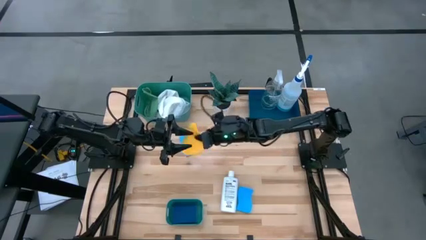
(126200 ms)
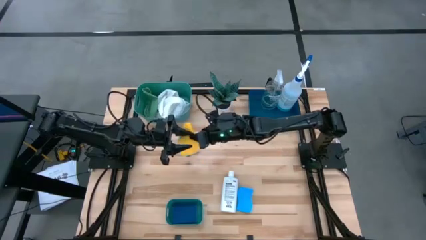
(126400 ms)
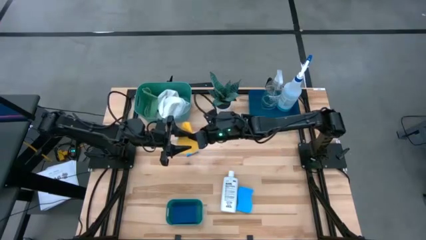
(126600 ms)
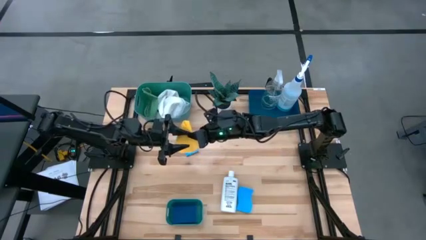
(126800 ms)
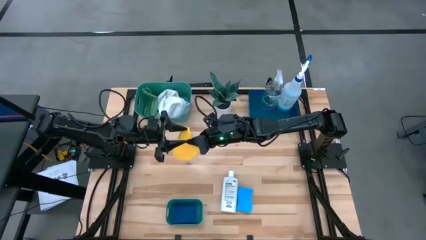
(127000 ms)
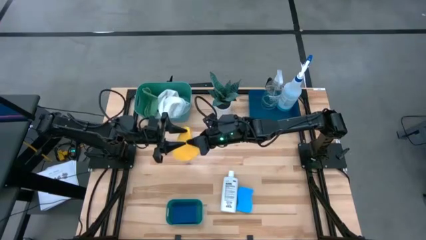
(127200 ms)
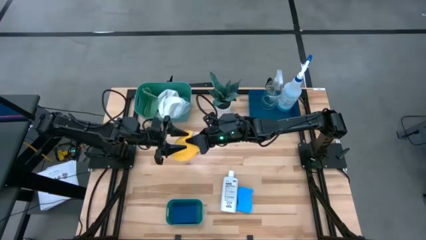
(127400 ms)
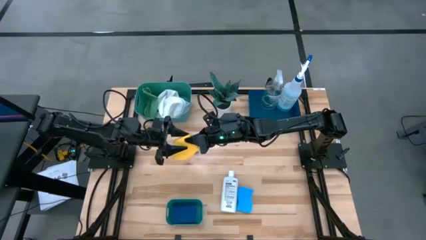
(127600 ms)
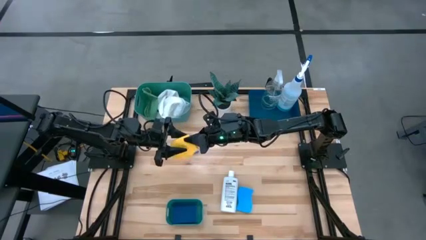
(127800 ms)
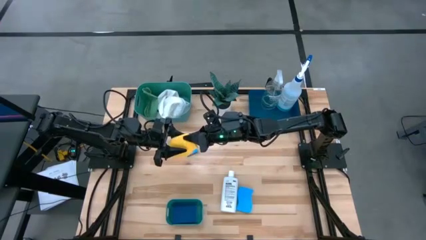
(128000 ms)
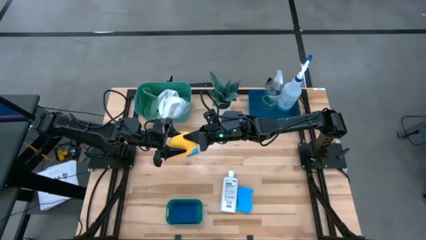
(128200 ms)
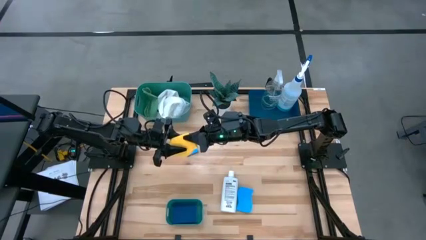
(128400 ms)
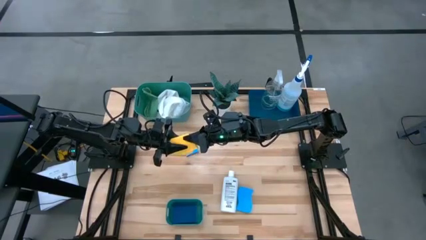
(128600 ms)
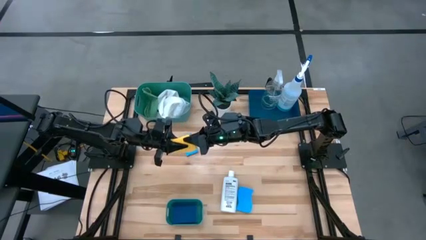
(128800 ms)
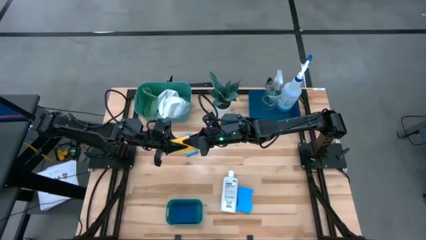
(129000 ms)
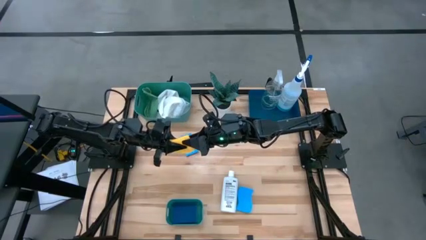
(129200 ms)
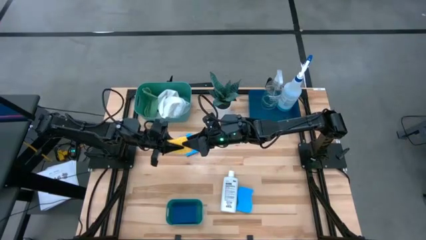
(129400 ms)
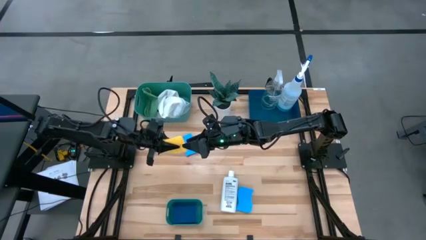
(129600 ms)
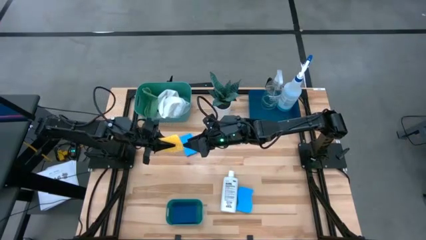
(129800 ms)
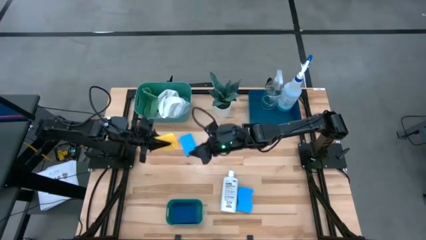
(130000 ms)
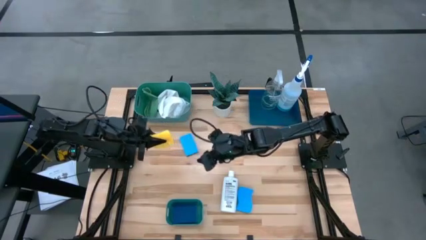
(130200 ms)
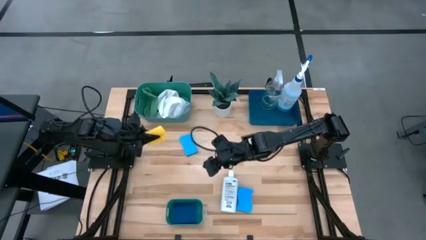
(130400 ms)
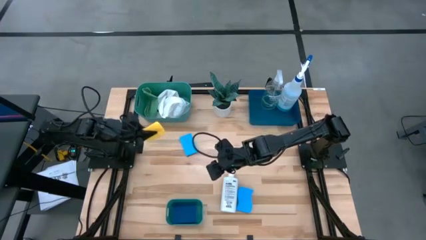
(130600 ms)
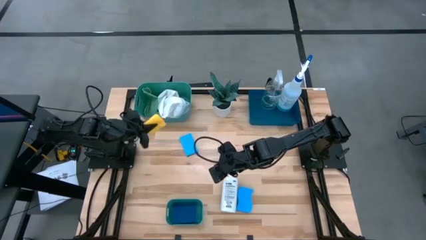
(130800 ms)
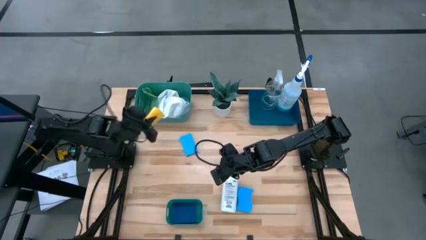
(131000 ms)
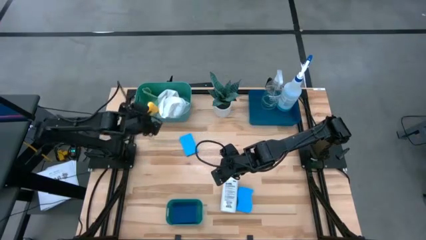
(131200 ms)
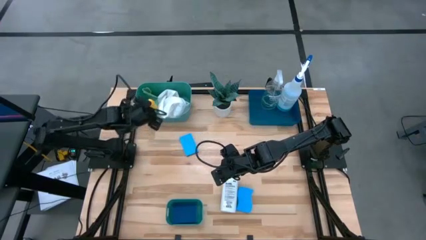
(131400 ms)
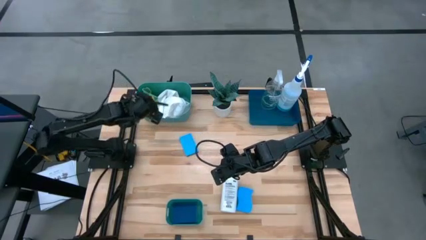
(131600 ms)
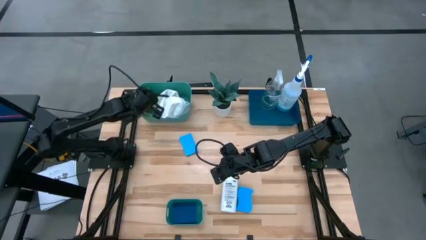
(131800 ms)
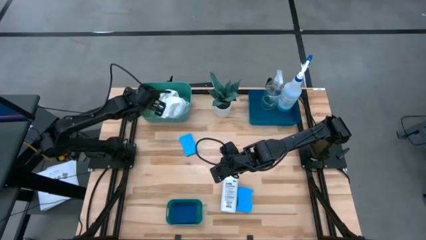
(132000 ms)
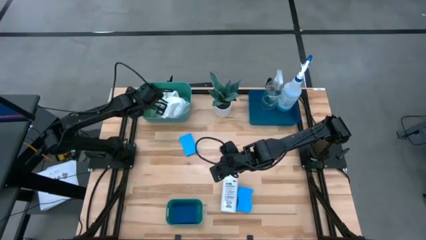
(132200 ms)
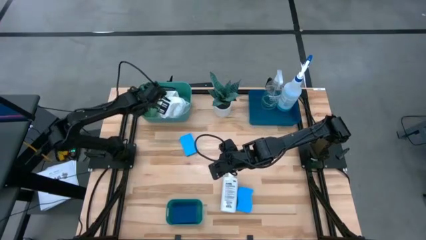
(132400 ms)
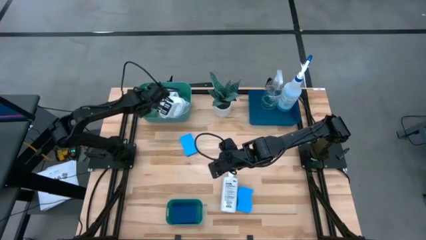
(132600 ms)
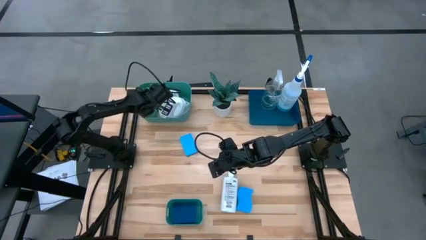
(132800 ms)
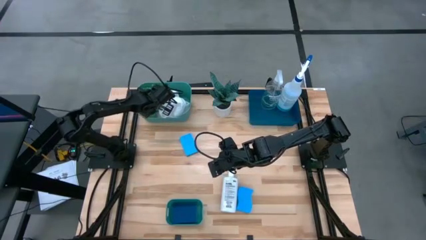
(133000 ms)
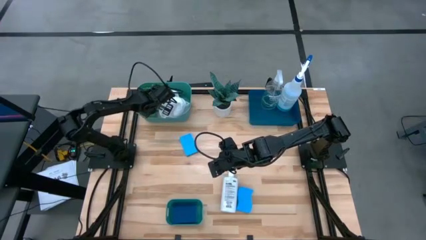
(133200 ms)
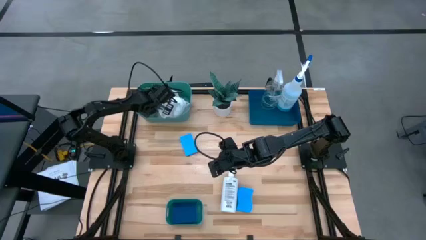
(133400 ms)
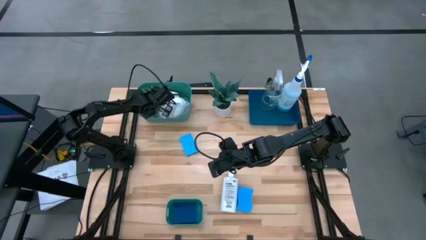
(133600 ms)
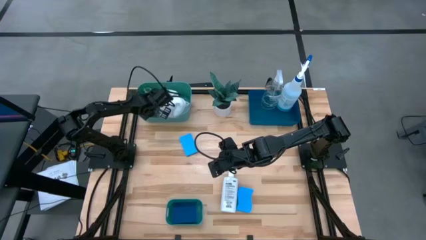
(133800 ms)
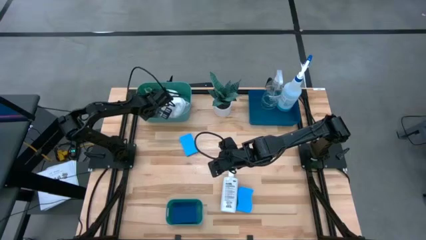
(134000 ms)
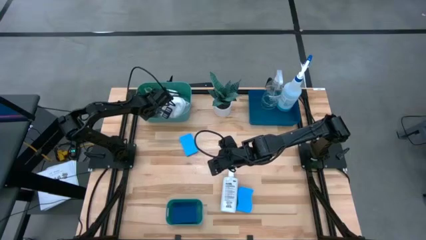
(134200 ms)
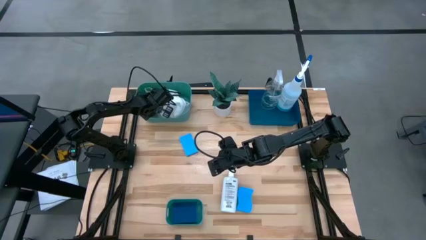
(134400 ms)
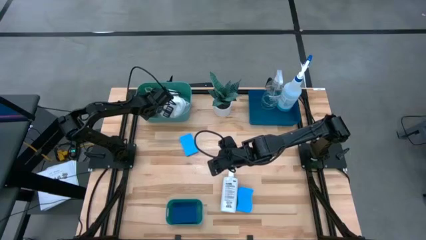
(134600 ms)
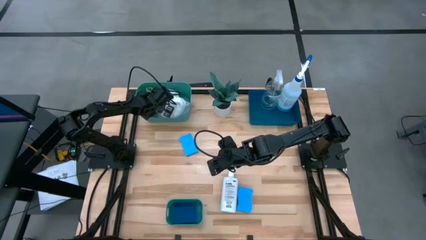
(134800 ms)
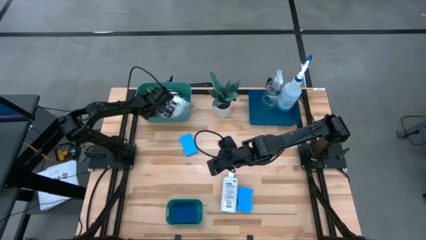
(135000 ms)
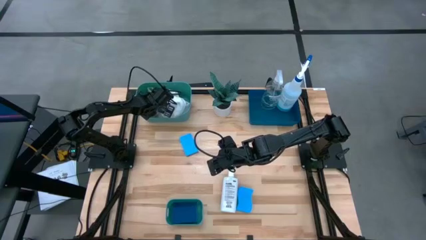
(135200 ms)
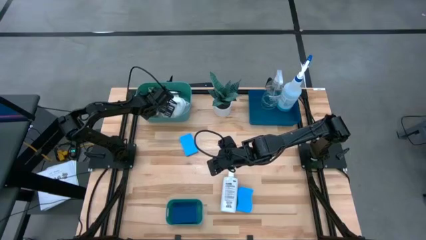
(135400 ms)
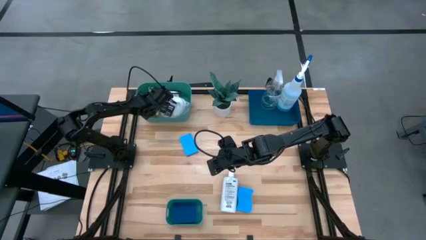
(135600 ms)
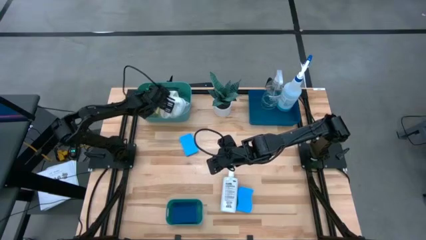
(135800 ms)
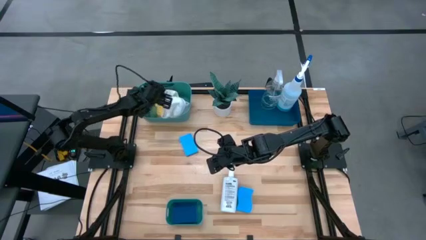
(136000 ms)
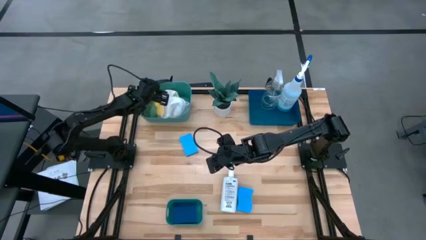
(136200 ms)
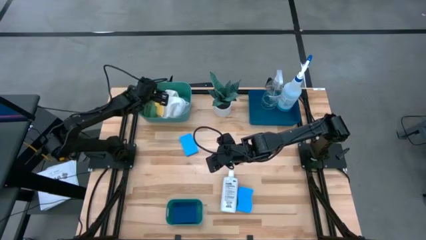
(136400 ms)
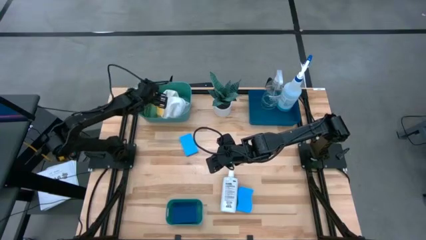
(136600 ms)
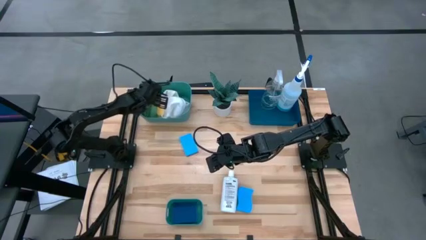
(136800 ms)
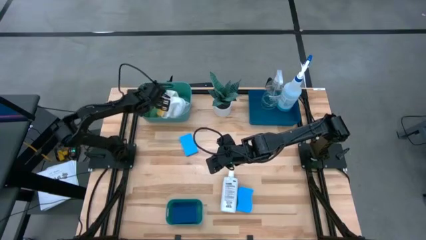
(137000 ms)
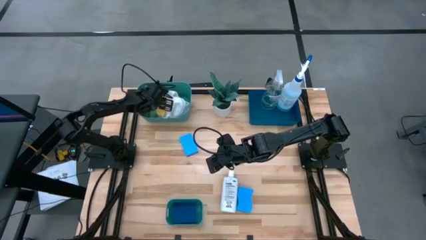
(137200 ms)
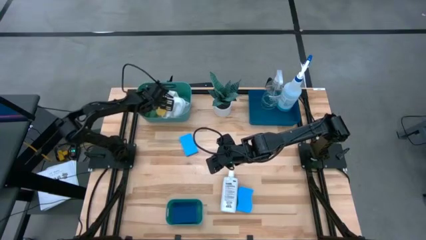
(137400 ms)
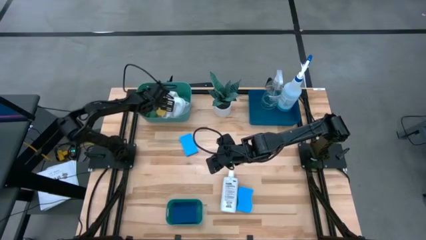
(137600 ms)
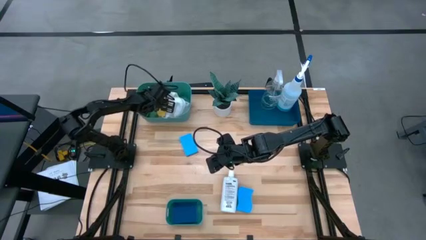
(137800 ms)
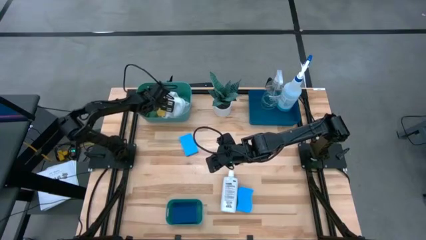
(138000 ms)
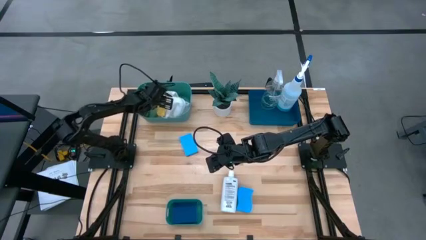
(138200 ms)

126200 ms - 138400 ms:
Task: Pick & Place Kitchen Items
Put the yellow microfiber cloth into the top green bin

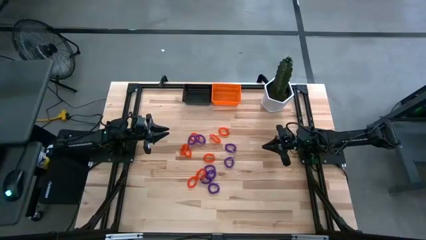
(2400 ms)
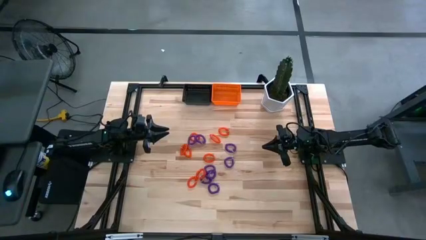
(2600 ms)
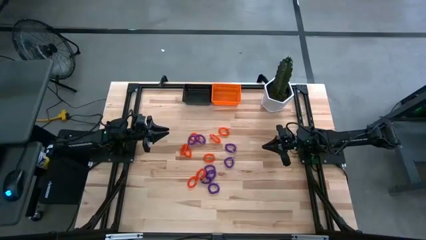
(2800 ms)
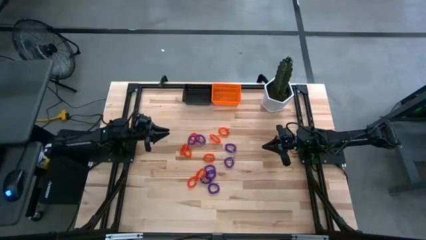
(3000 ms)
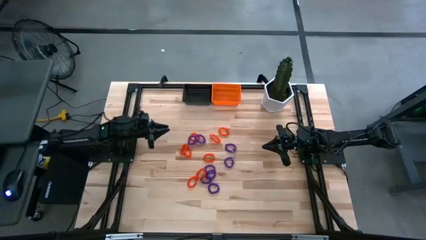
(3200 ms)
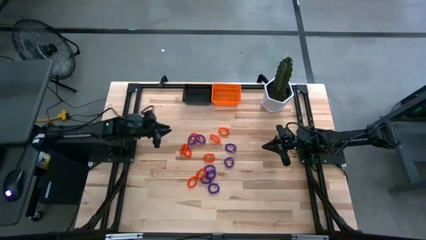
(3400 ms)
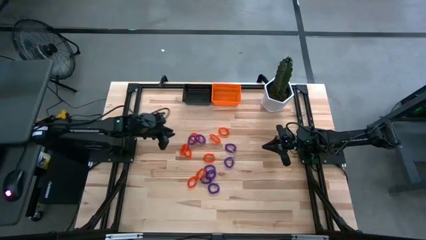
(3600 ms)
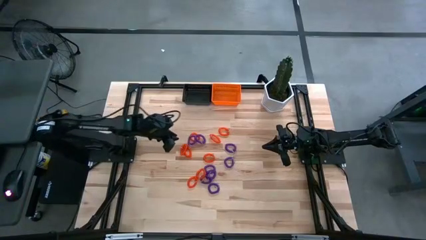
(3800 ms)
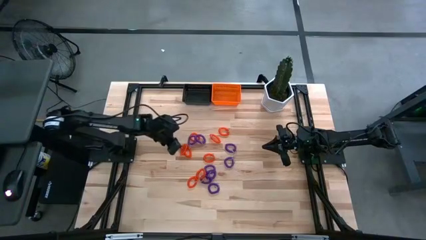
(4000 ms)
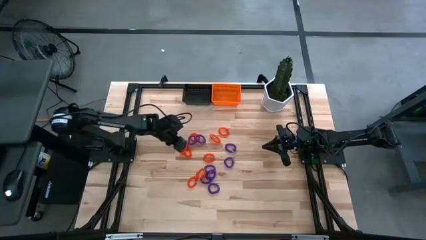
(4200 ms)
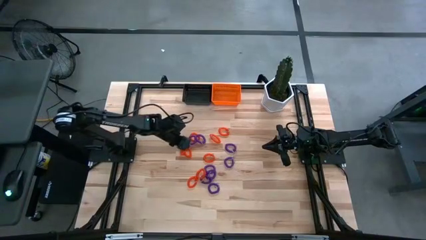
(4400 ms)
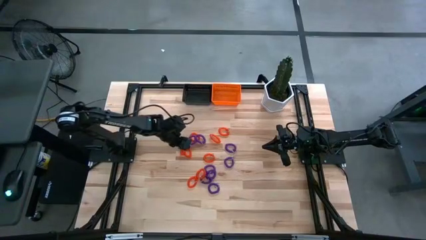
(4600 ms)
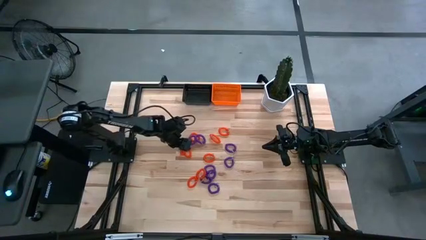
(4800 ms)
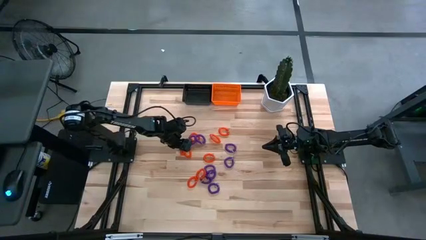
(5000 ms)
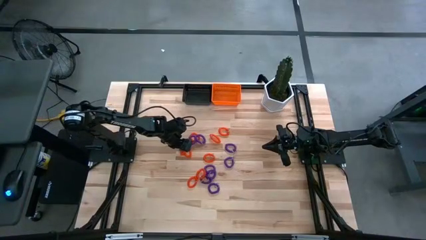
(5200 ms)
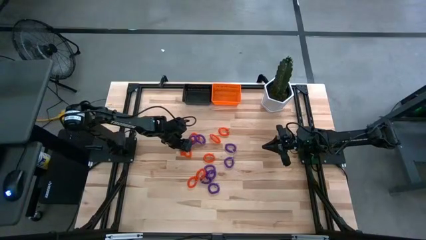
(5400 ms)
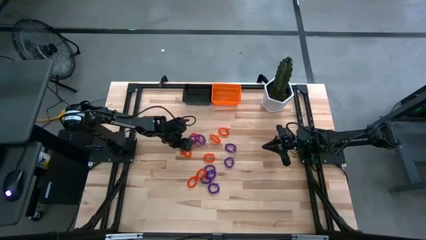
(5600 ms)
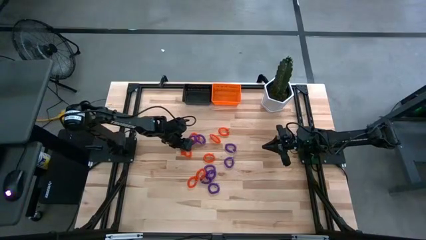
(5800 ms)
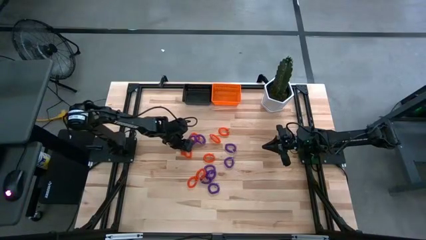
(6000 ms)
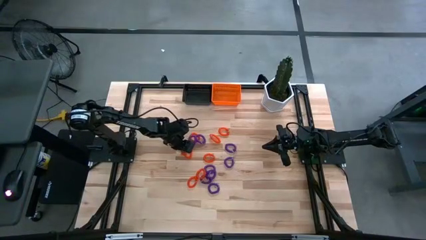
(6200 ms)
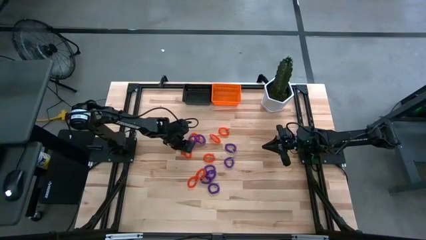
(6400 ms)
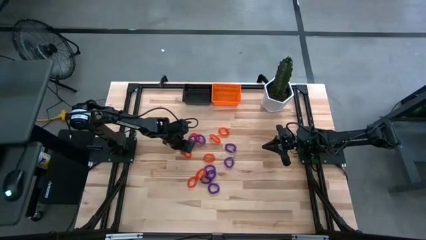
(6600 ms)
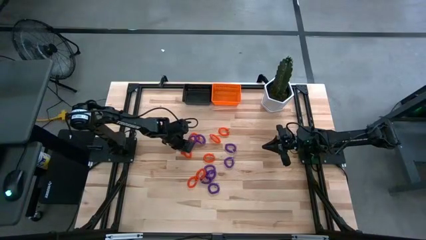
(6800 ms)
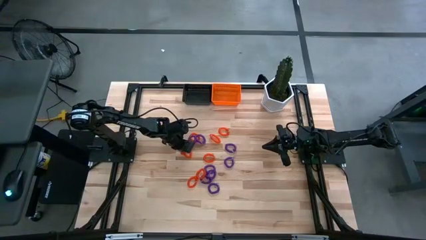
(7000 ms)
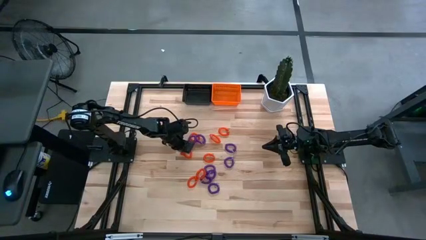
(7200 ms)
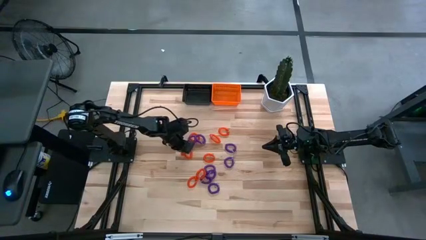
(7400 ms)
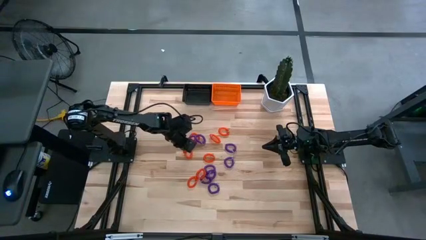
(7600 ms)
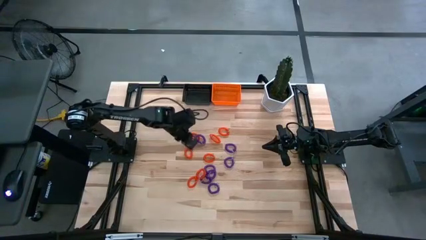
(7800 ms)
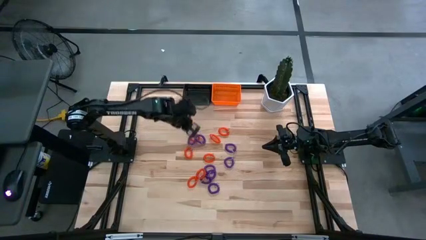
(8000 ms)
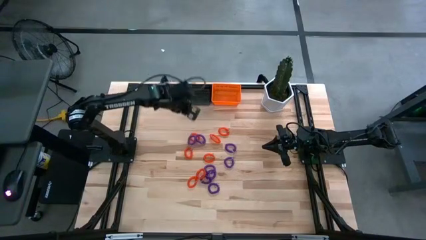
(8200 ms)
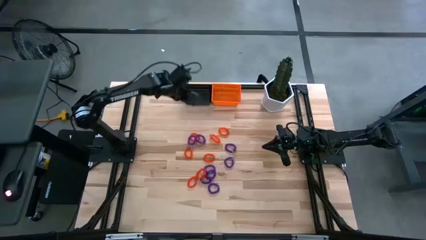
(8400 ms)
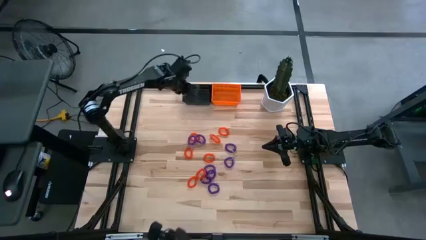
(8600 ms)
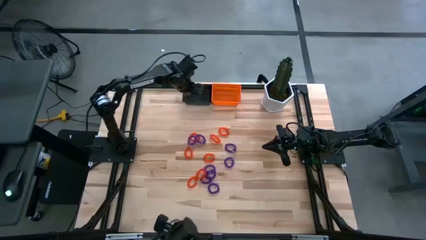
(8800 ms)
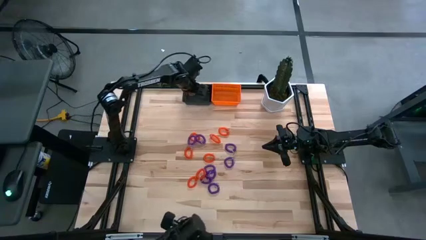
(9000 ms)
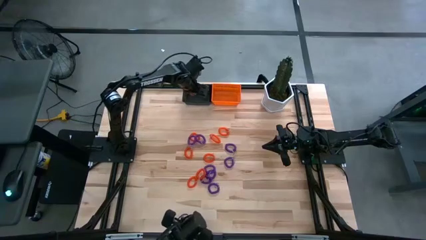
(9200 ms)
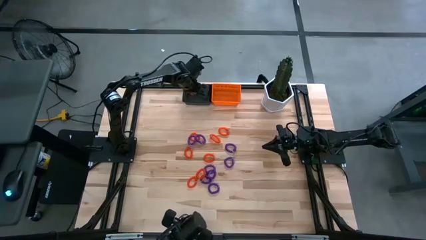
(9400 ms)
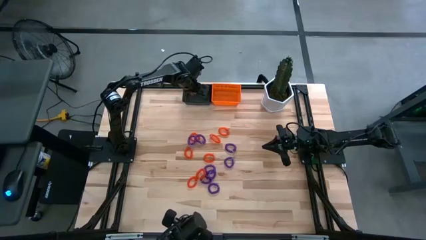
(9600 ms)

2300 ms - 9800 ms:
Task: Sort spring keychains into baskets
Put the orange spring keychain into the black basket
